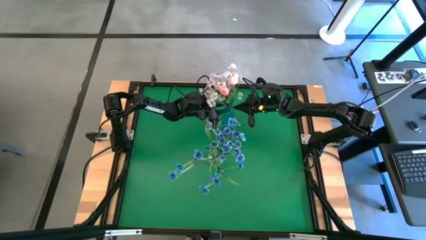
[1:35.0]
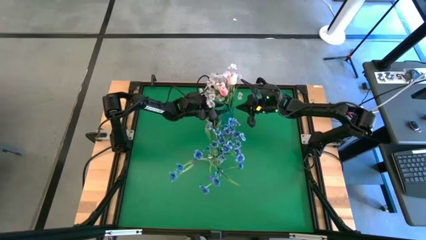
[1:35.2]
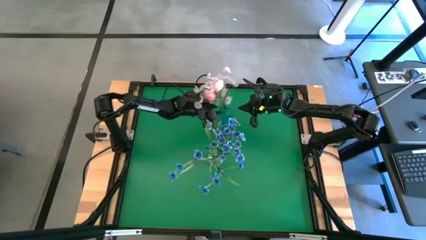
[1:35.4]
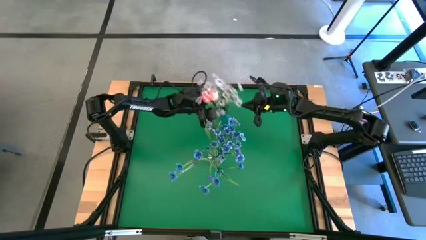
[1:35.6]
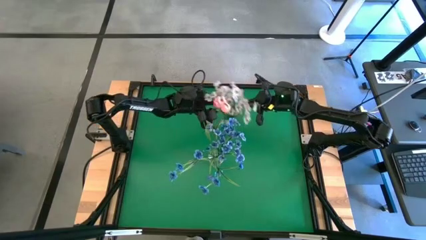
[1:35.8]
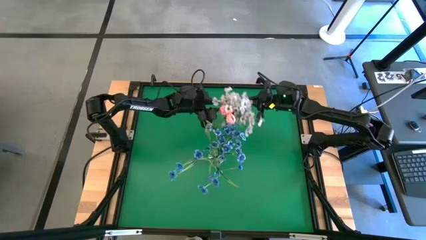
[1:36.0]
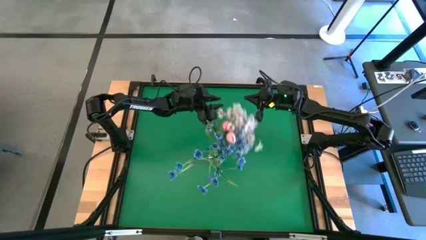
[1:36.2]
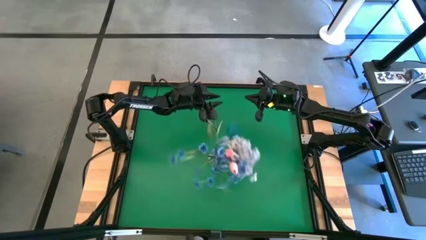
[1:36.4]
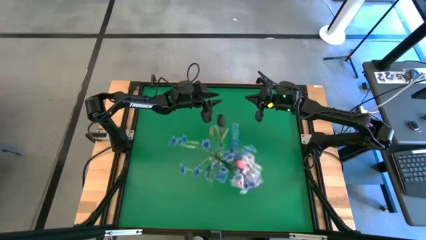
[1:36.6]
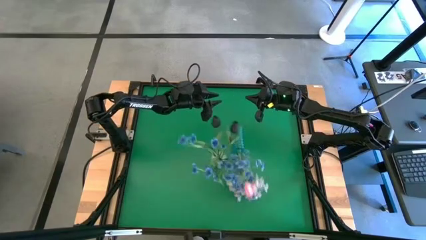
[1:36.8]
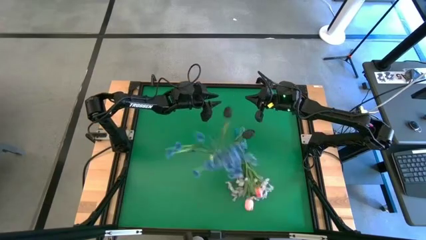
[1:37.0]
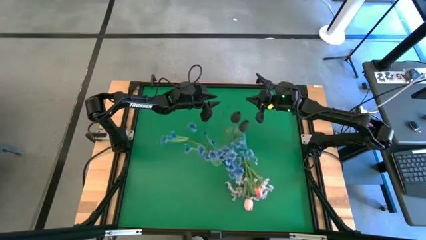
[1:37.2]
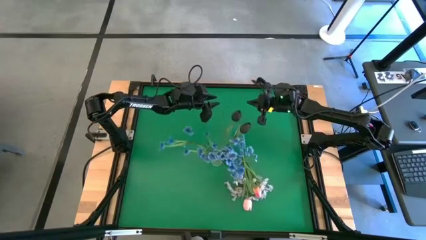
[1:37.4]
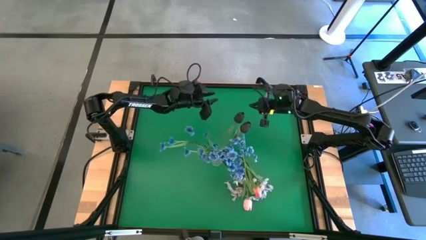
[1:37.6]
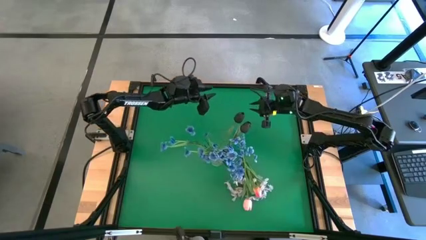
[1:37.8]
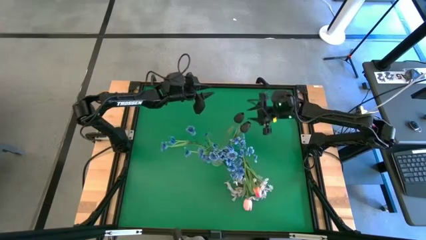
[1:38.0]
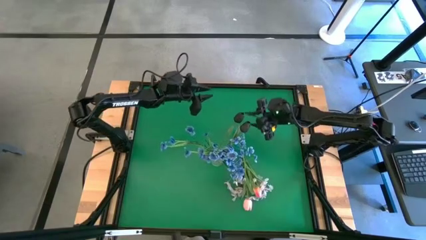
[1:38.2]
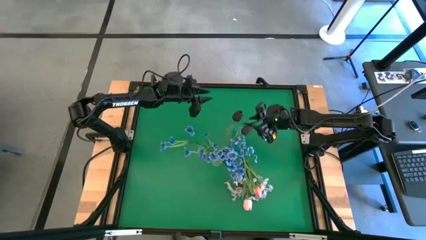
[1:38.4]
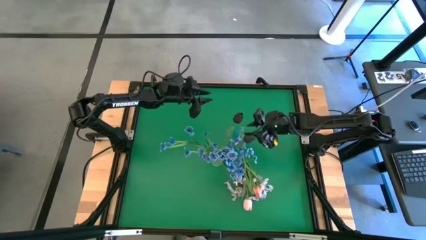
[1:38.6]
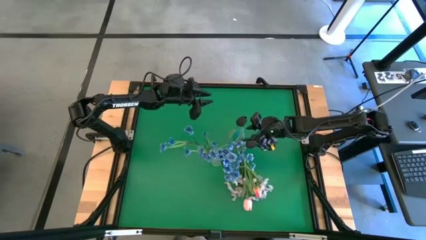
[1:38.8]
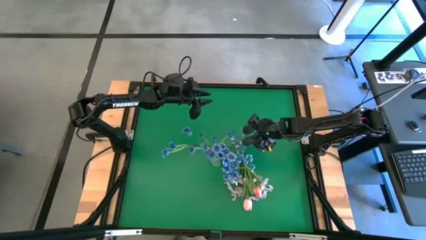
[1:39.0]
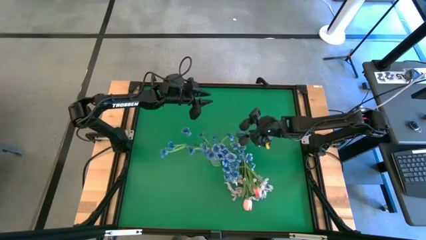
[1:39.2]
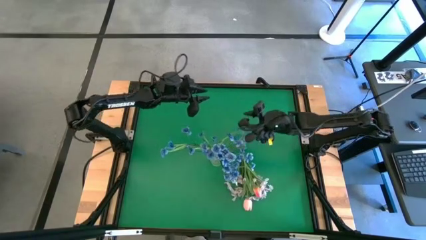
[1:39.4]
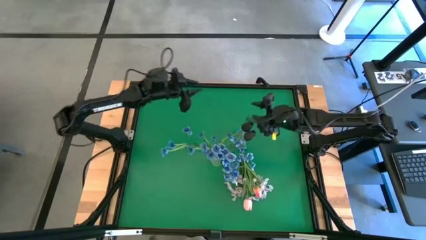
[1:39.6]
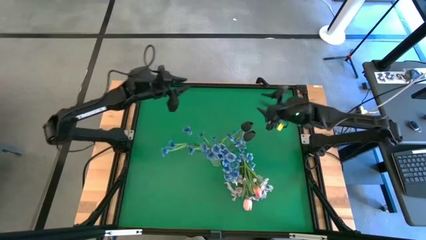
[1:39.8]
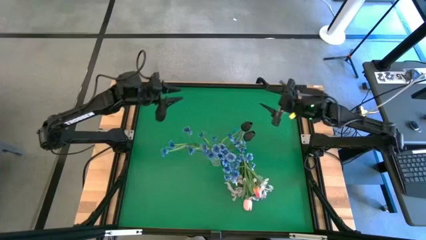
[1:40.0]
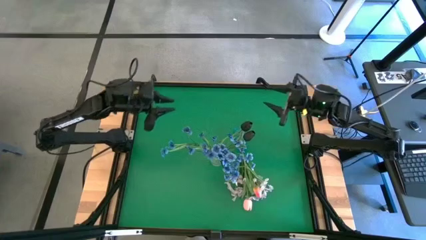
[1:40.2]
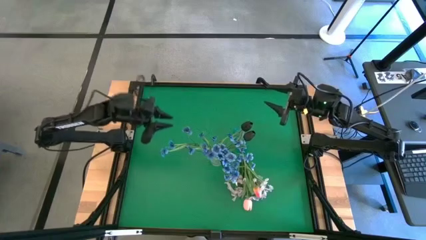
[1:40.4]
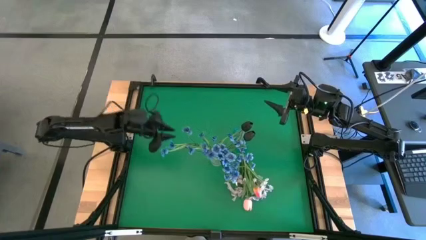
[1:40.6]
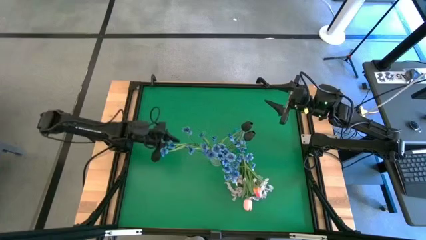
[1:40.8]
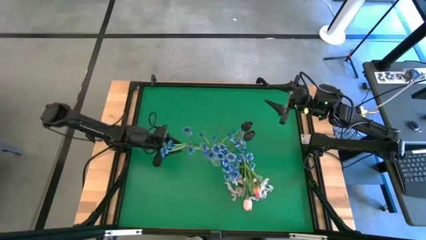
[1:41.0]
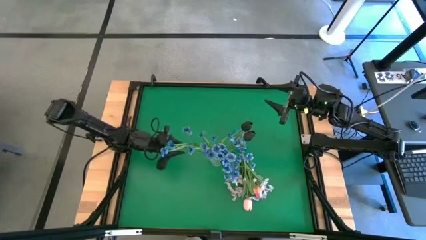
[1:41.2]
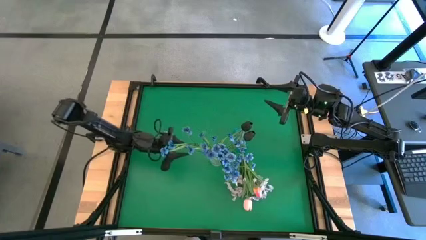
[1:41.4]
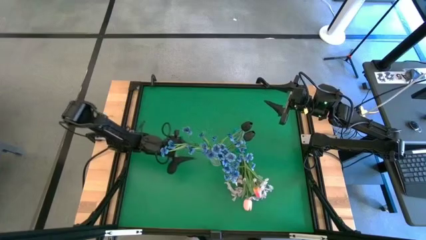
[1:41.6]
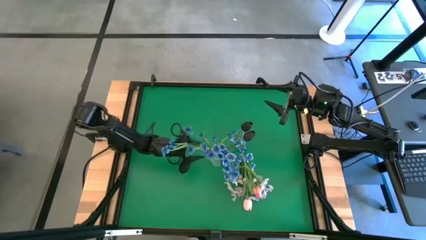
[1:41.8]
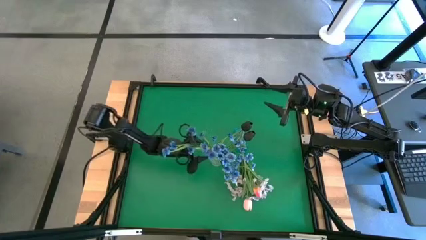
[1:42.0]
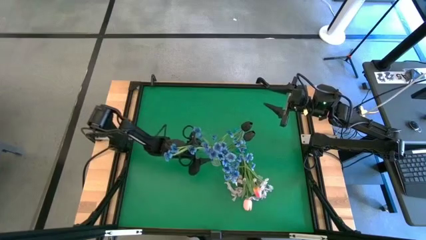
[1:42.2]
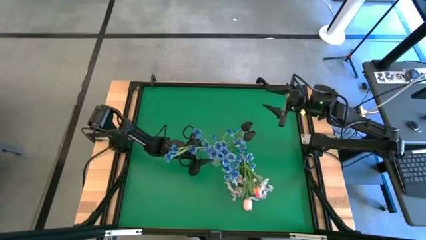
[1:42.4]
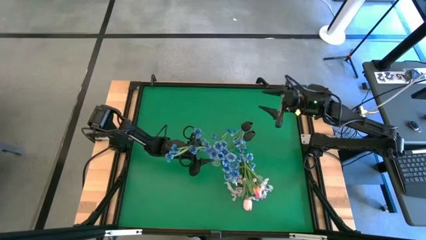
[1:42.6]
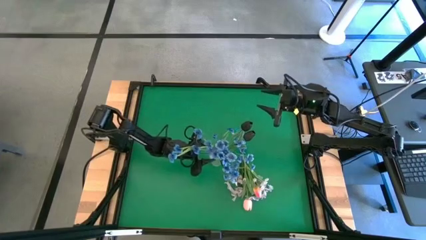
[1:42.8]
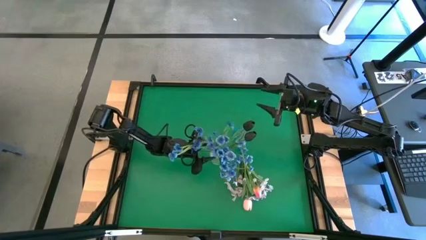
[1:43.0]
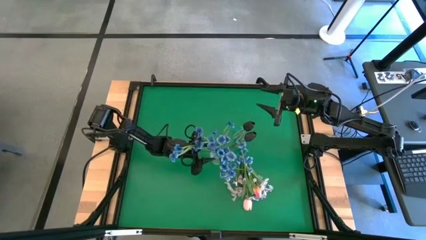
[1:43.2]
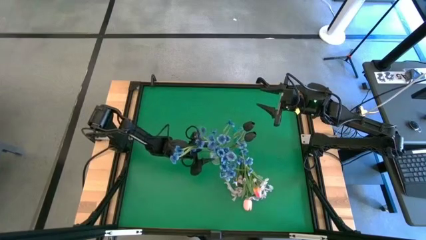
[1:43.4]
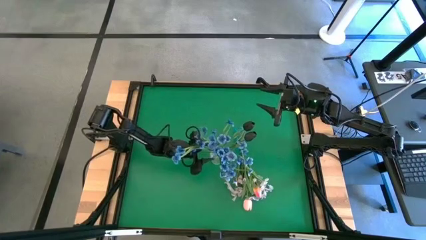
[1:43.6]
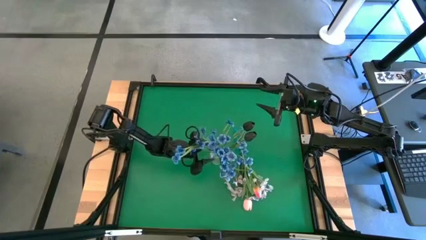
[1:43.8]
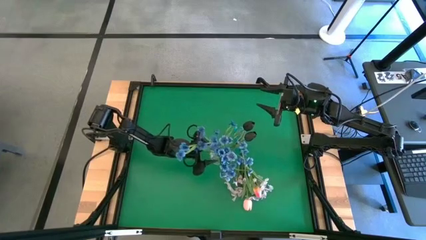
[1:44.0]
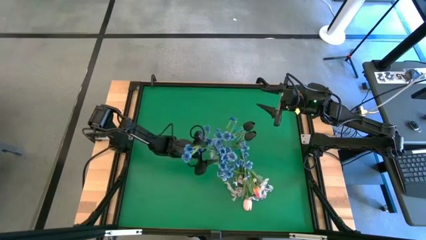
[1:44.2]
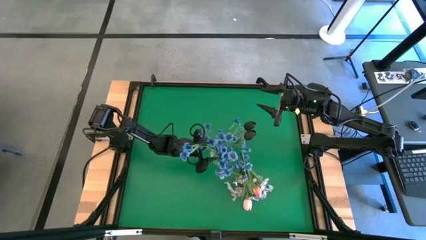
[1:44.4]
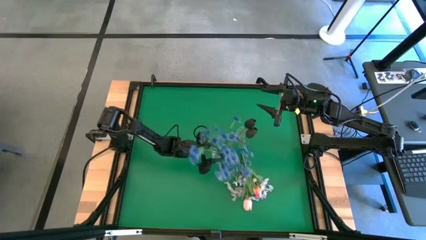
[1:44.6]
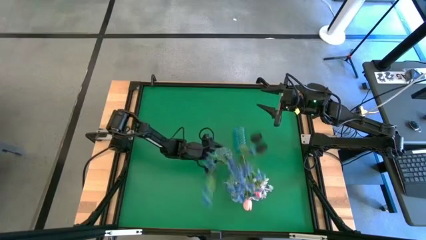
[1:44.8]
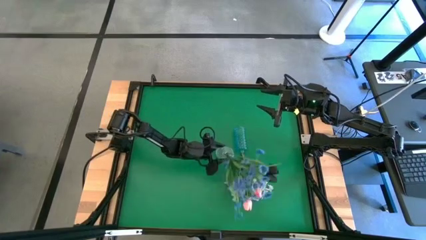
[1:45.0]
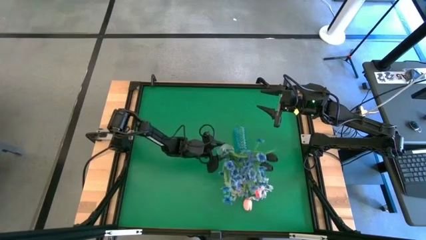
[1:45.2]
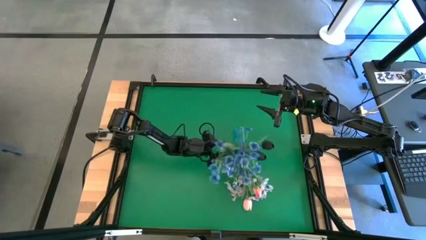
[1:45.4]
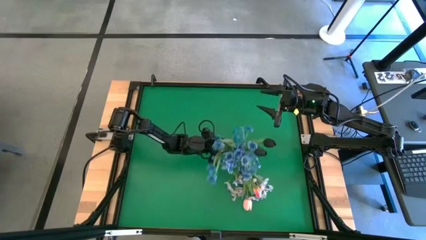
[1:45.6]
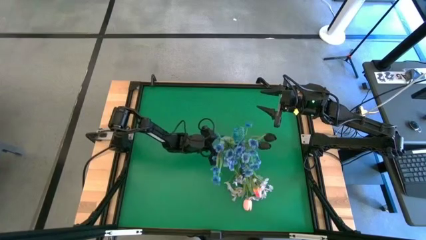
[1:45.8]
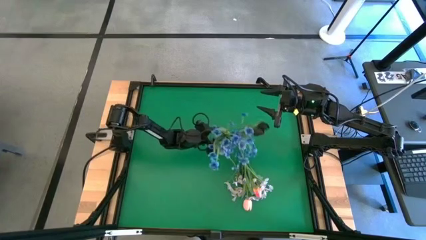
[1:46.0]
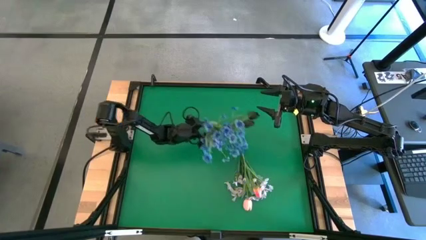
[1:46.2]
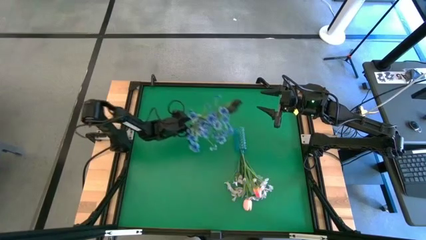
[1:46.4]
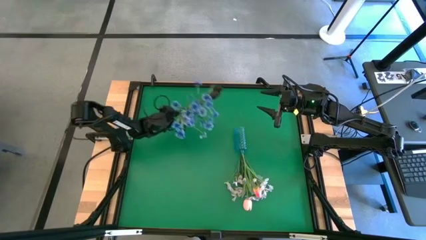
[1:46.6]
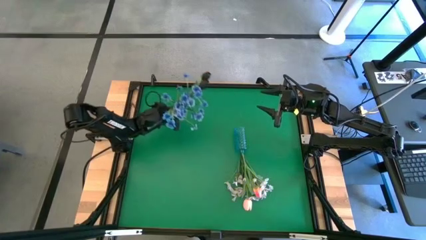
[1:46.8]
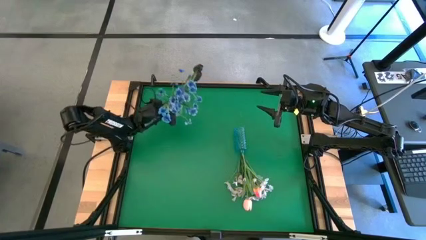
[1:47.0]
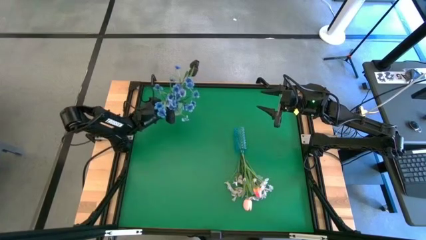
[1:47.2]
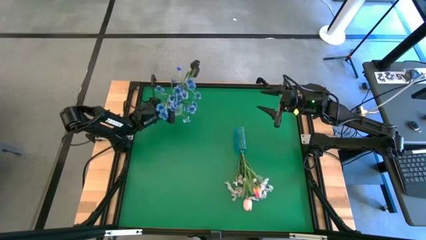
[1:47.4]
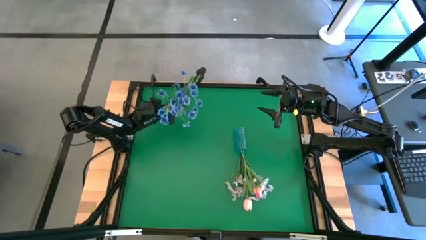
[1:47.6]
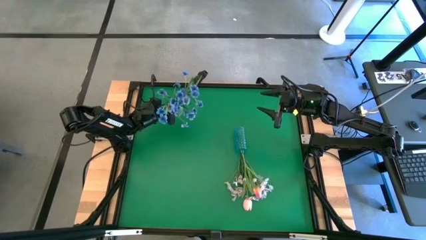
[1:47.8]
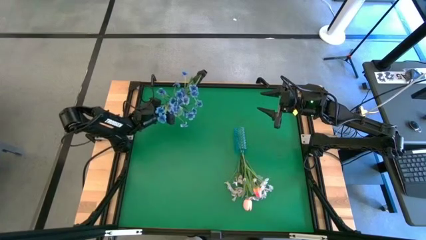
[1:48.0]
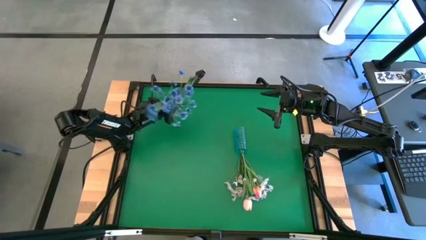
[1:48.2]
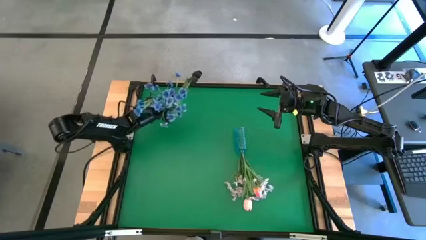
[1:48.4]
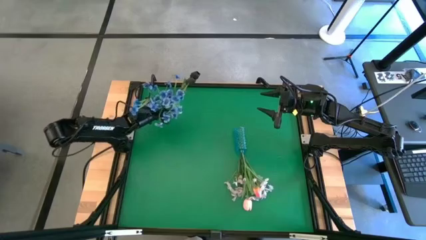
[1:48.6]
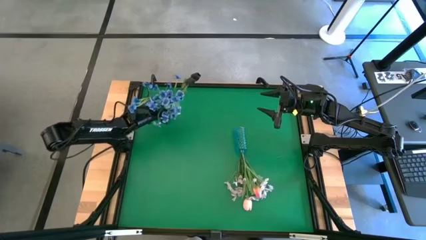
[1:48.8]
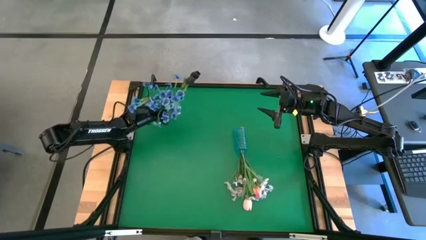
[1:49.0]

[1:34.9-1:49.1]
Task: Sort flowers into vase by color
Move the white vase to the top left of the table

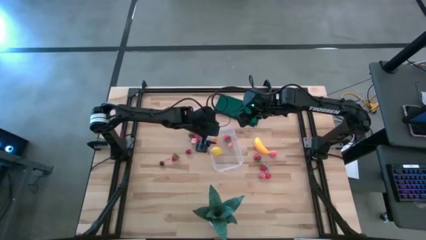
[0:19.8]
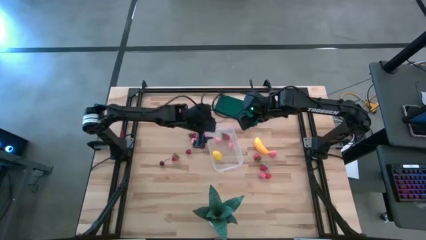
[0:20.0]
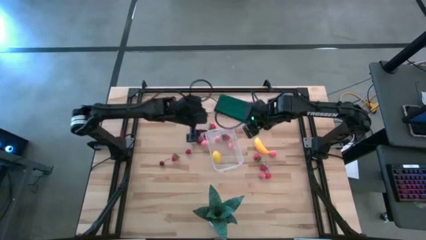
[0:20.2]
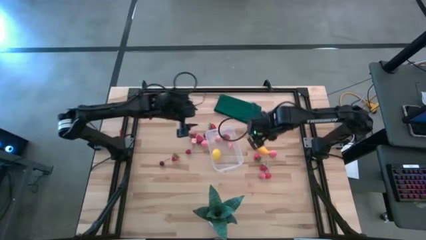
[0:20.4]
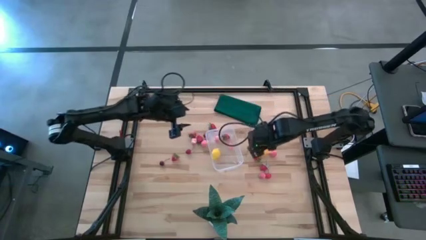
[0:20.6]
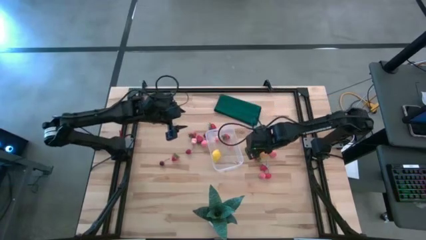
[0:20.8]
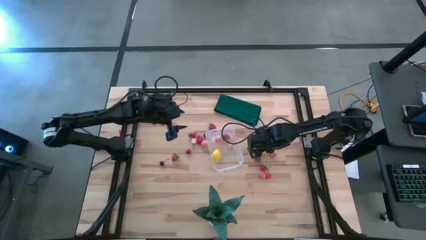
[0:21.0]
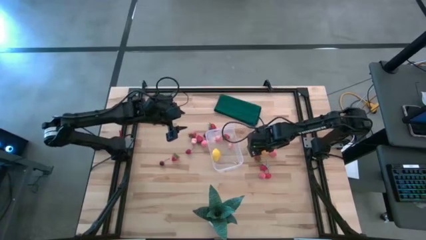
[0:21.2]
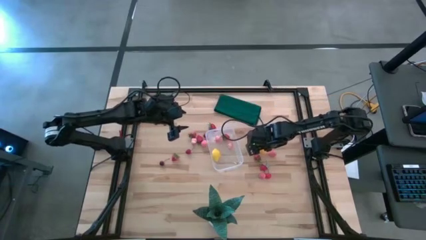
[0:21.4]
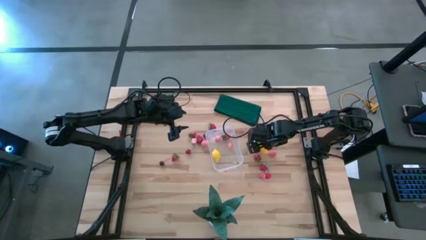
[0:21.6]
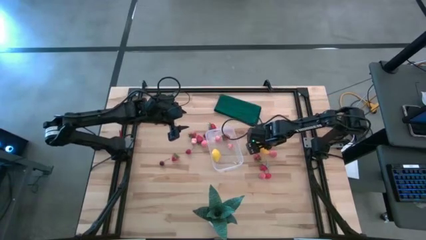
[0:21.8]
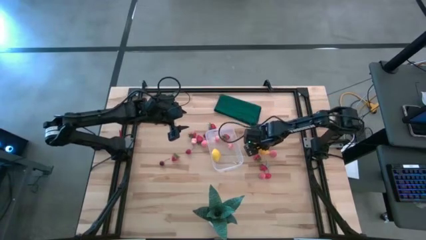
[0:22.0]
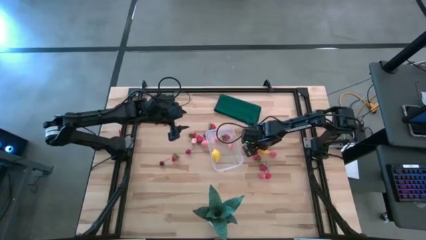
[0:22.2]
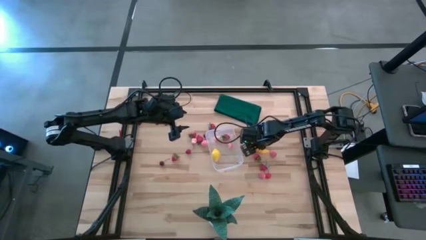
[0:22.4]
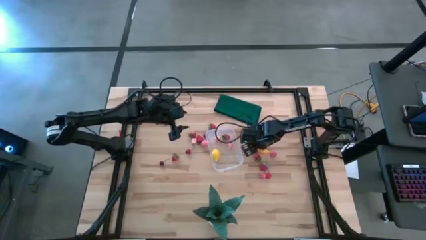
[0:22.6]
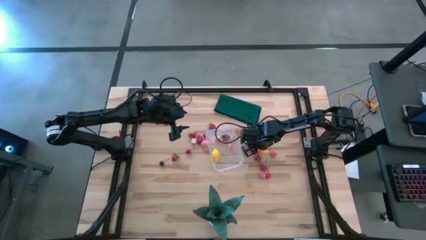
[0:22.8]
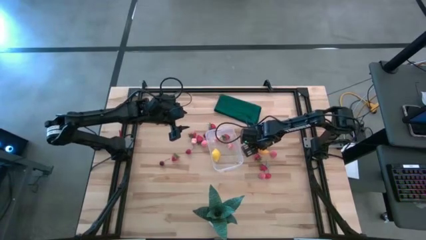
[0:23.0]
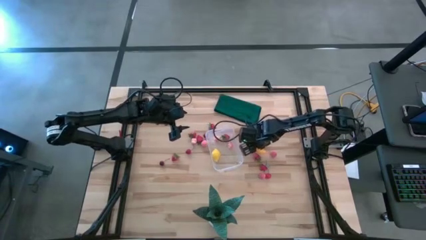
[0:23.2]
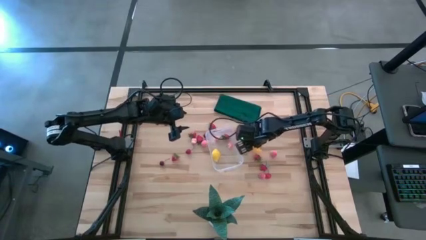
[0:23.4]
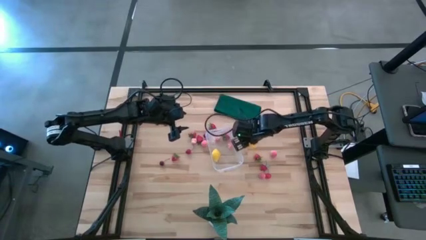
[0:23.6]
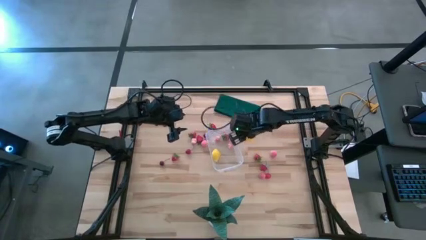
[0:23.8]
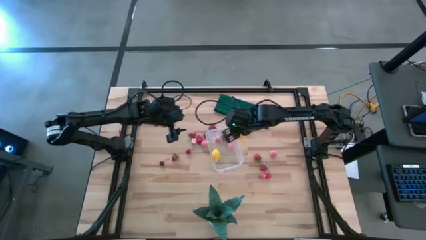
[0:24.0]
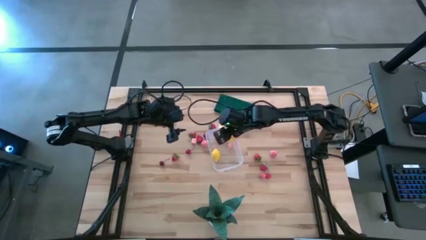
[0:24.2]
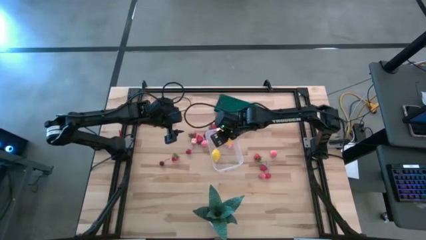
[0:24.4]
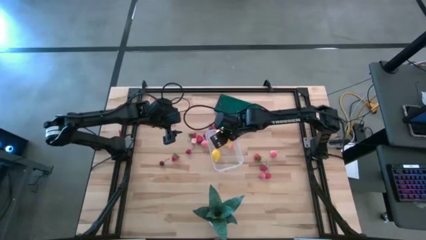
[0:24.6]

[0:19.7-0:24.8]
Task: Pick and placing Produce into tupperware
Put the banana into the transparent bin
